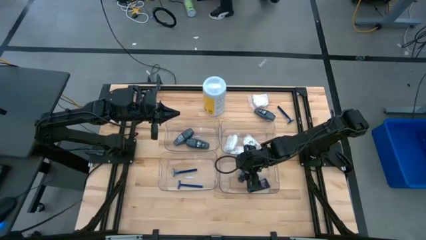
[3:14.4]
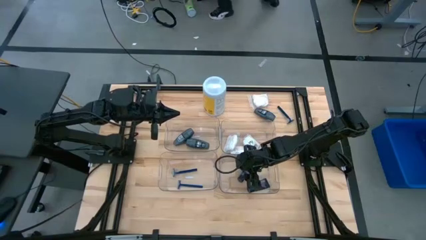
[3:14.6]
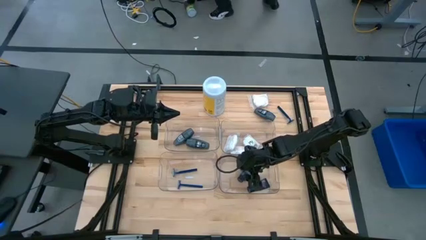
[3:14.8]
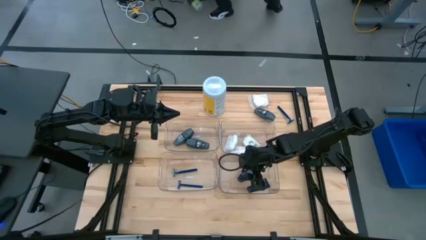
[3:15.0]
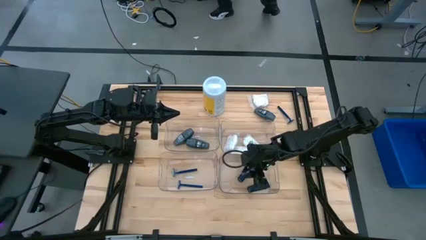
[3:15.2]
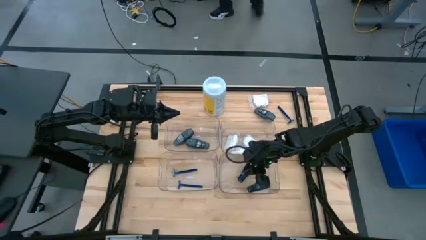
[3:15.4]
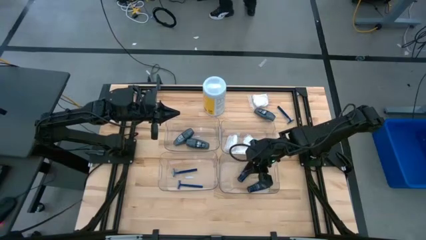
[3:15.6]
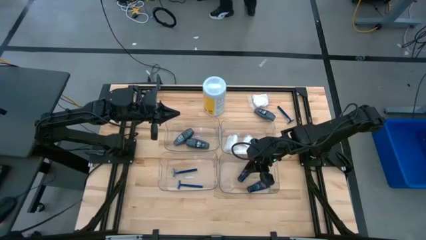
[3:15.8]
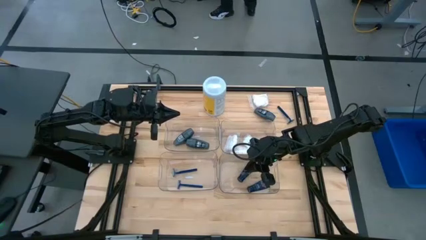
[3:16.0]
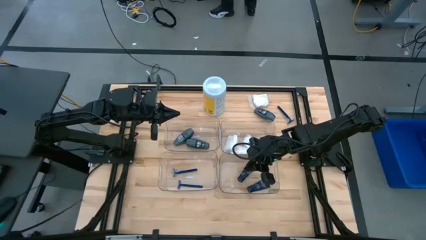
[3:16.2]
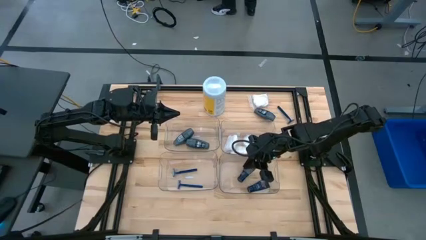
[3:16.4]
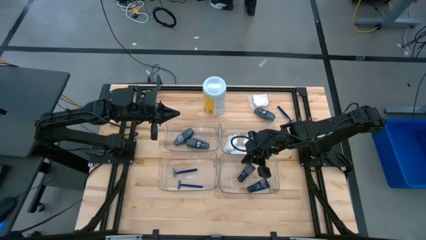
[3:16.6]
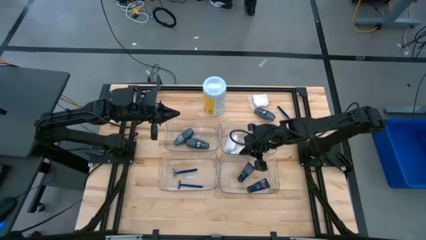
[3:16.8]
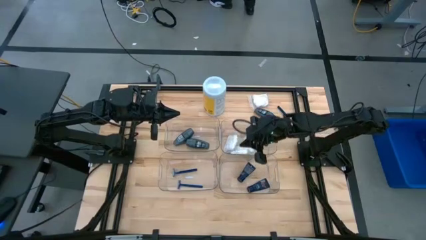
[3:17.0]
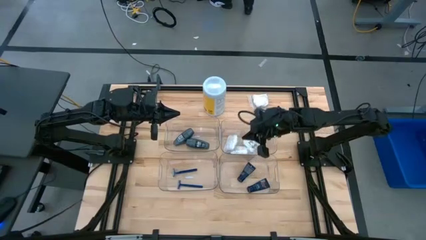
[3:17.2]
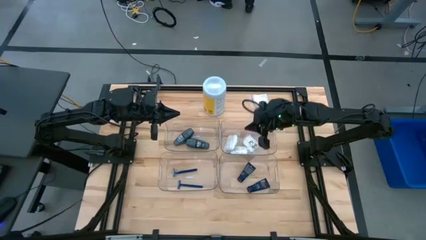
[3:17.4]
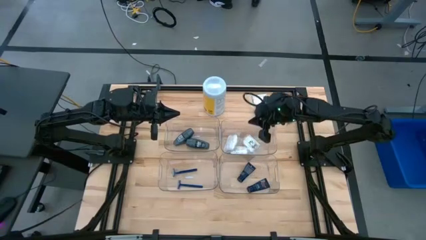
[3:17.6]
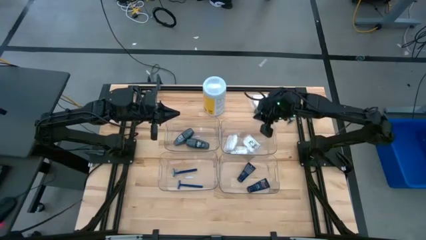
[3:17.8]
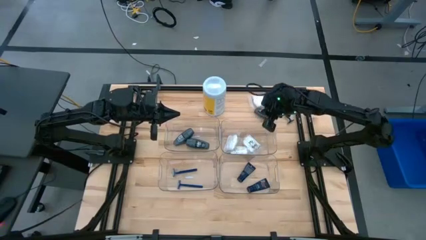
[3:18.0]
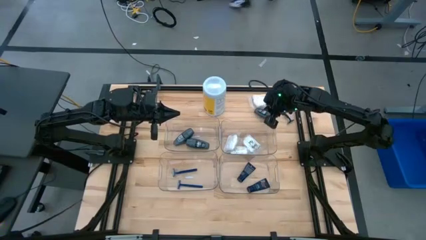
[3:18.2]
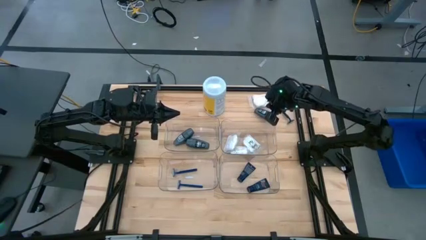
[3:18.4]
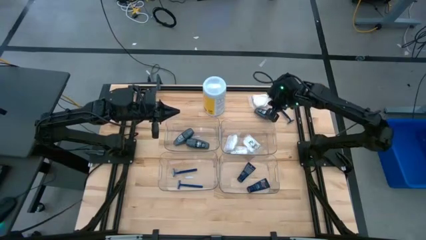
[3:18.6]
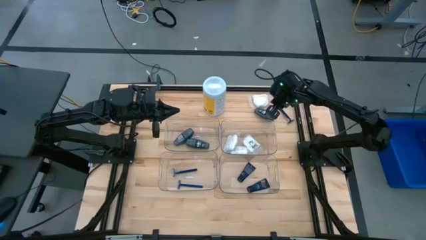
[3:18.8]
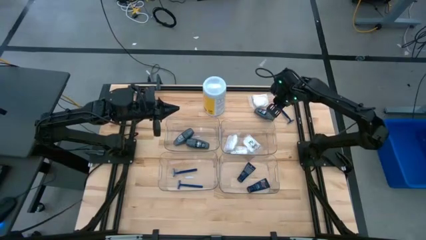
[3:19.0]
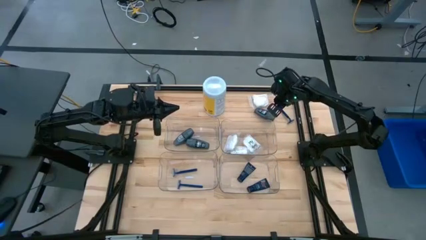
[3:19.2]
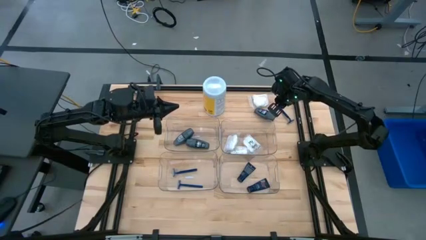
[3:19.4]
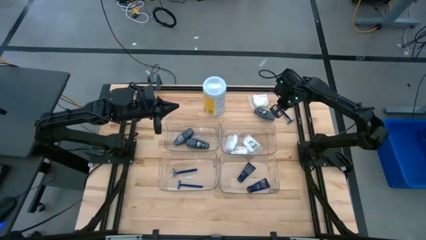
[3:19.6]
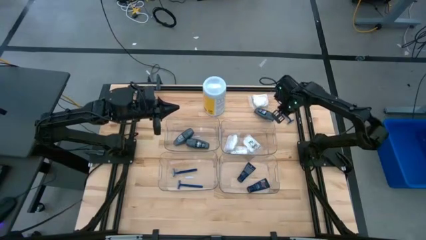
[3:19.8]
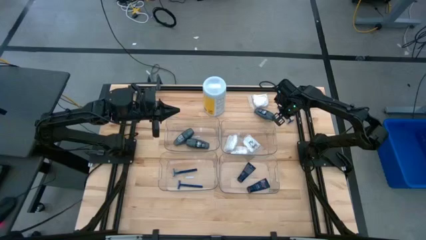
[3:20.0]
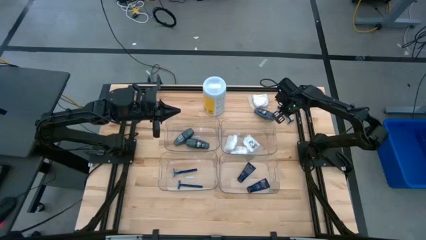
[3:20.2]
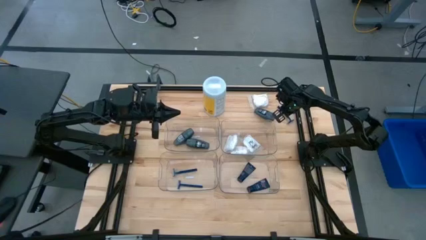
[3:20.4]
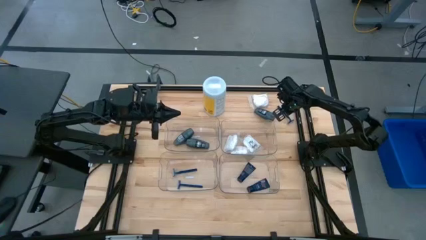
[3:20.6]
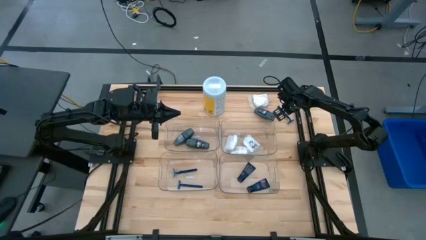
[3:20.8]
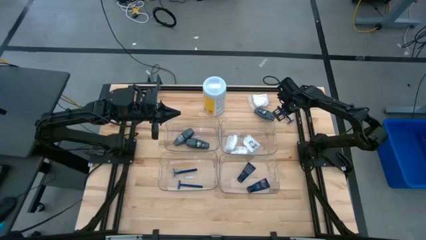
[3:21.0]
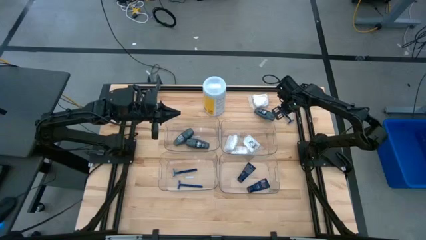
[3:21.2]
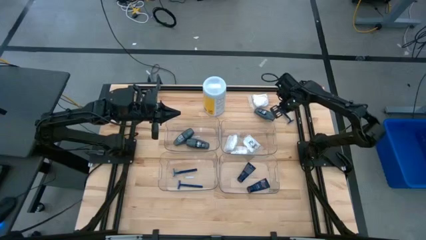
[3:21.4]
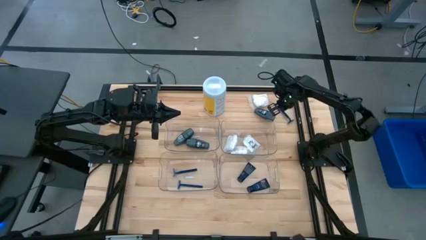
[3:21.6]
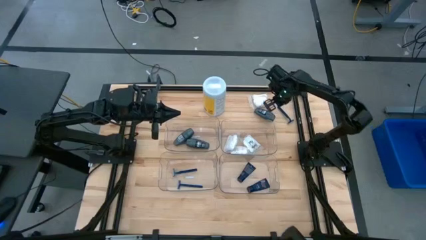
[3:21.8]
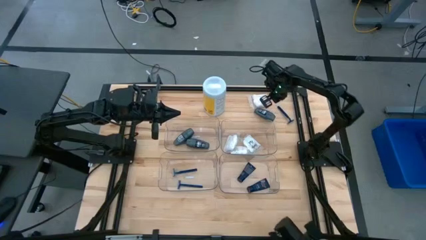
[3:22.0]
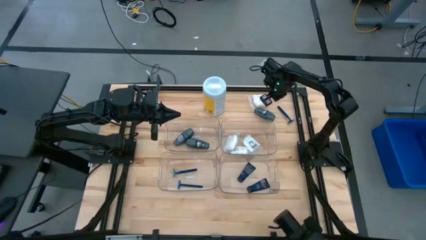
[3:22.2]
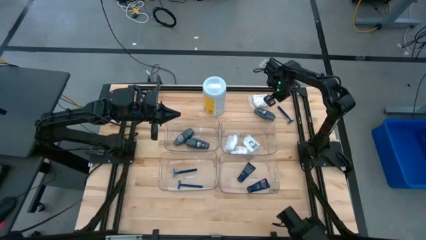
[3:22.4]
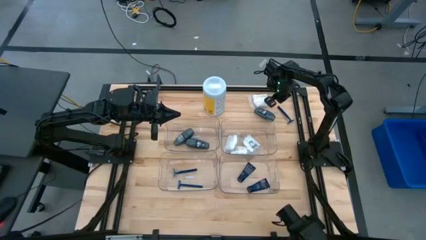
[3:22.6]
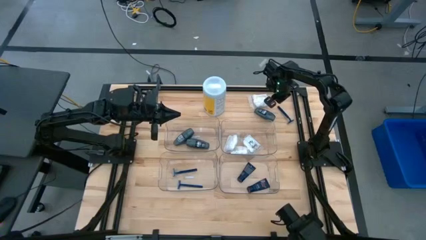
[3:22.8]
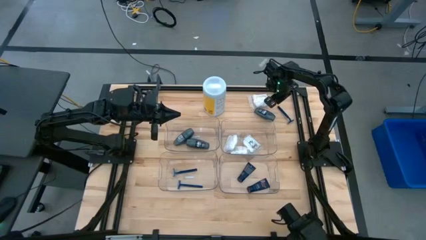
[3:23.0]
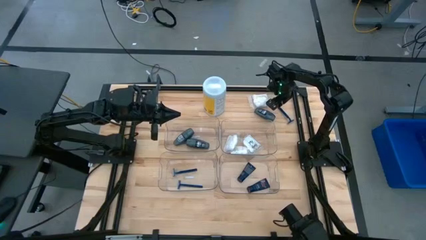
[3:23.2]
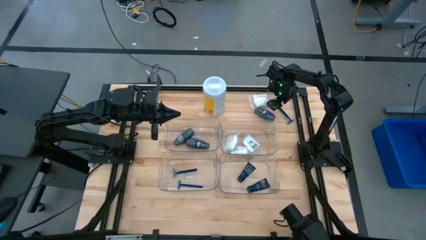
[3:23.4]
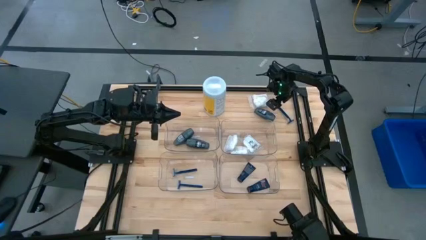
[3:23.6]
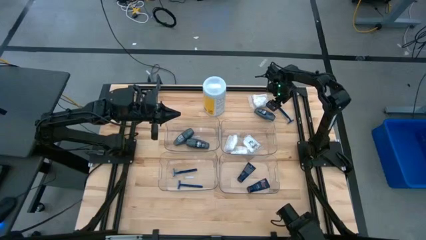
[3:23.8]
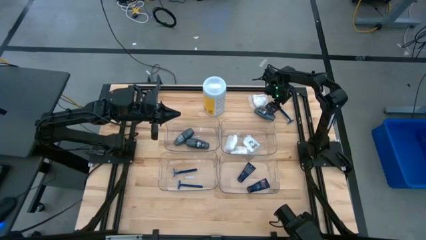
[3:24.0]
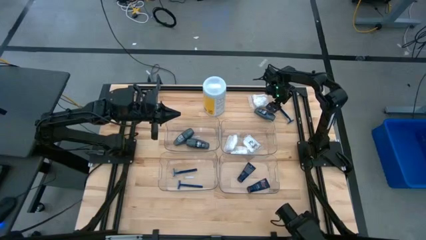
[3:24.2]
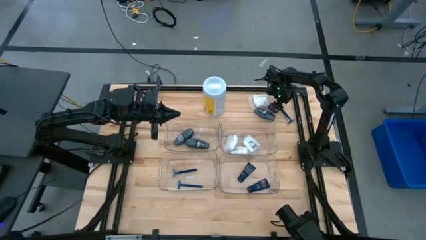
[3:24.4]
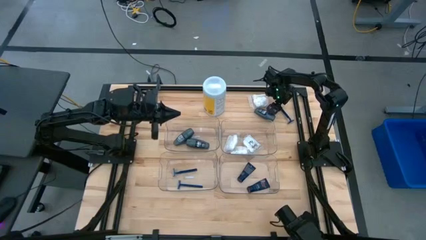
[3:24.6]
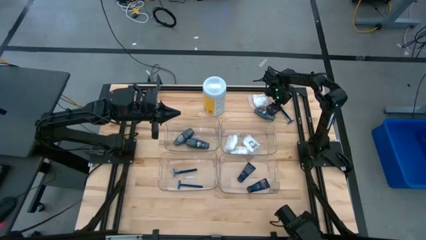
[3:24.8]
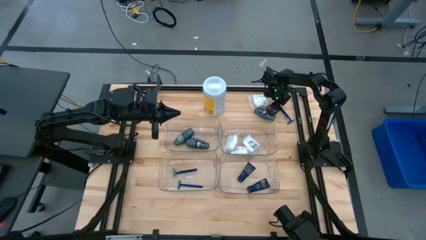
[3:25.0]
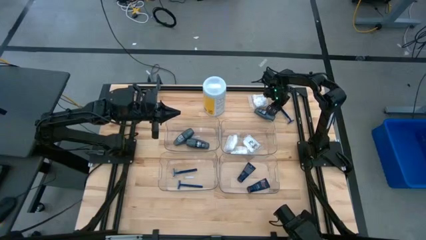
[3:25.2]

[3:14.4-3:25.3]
Task: Pick & Place Travel size toiletries
Put the blue shaver into the bottom left transparent bin

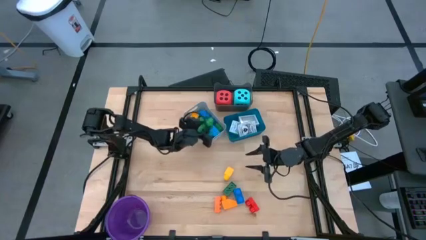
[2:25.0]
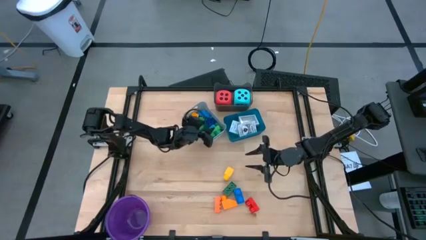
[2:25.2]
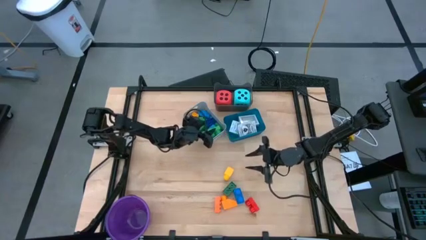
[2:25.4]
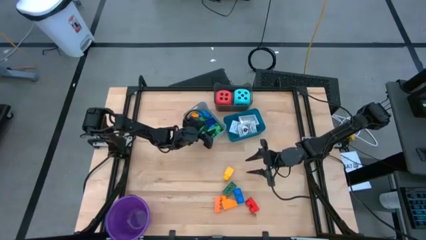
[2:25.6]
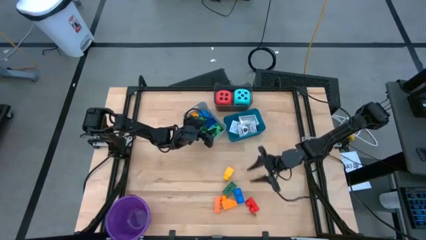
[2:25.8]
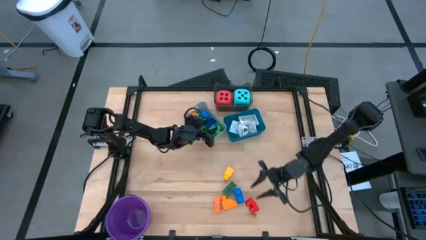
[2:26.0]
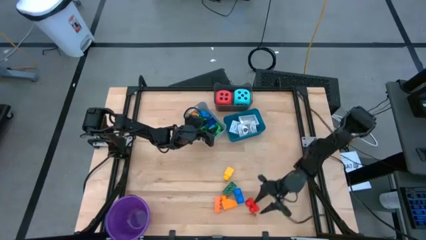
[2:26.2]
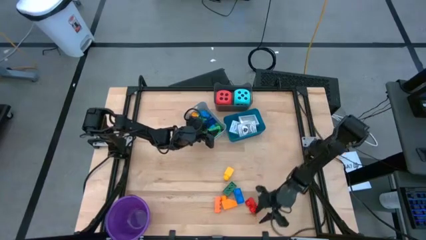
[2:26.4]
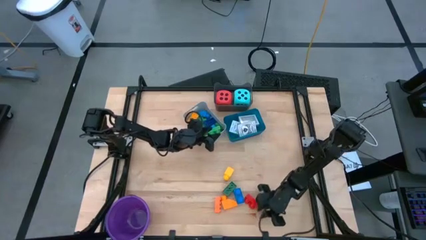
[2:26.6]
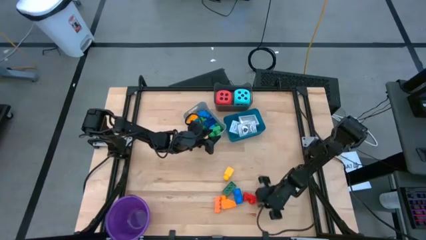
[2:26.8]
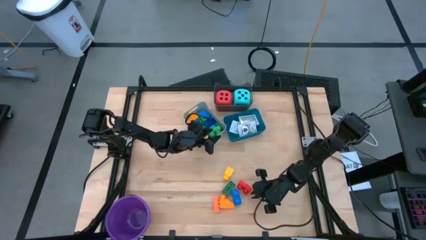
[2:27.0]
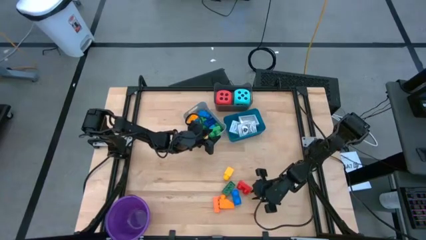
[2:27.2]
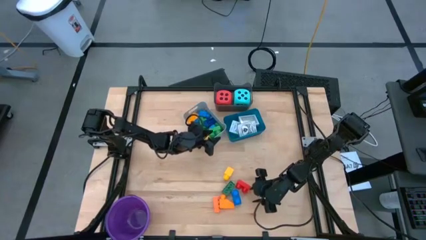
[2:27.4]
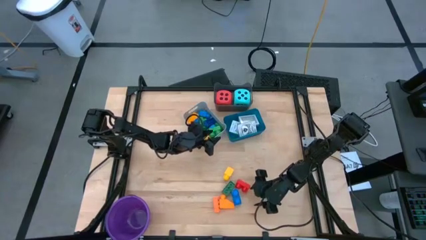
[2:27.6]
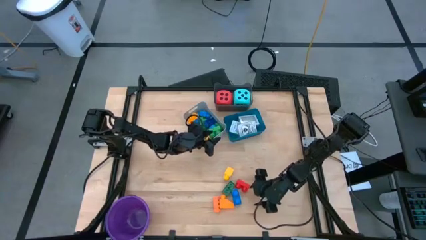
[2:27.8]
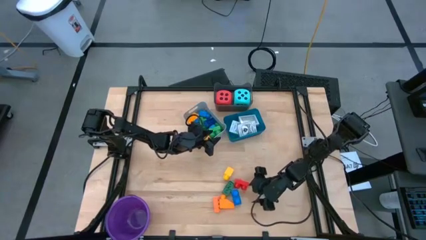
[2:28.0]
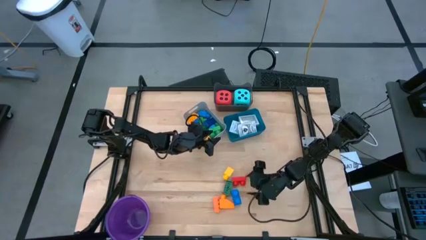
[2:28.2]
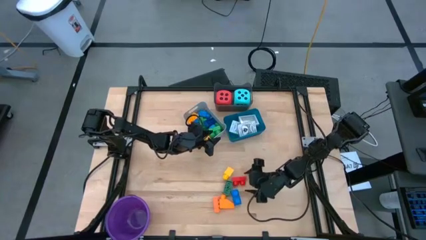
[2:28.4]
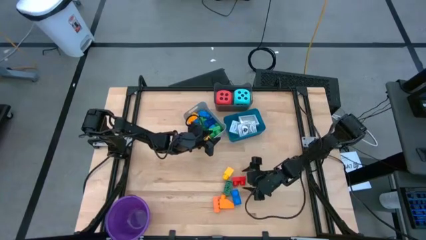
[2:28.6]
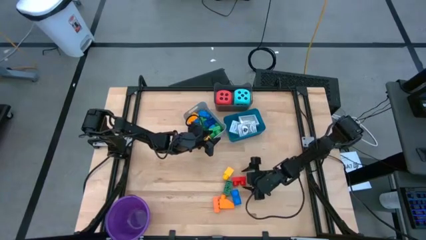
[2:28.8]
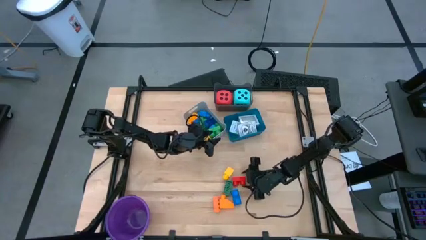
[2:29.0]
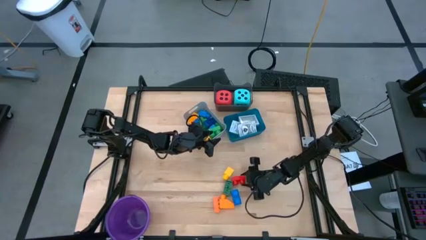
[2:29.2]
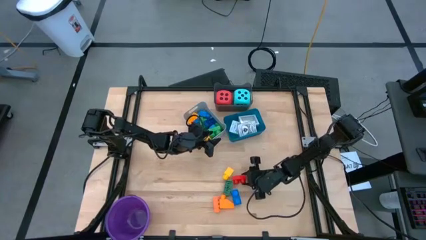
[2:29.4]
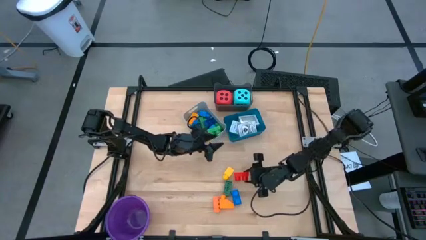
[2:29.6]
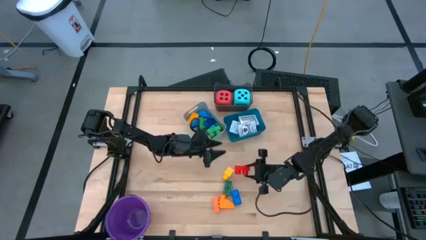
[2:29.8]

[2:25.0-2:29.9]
Task: Pick & Place Toys
Put the red game piece into the gray bin
